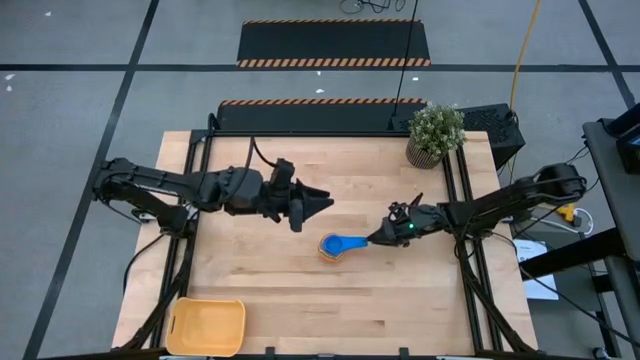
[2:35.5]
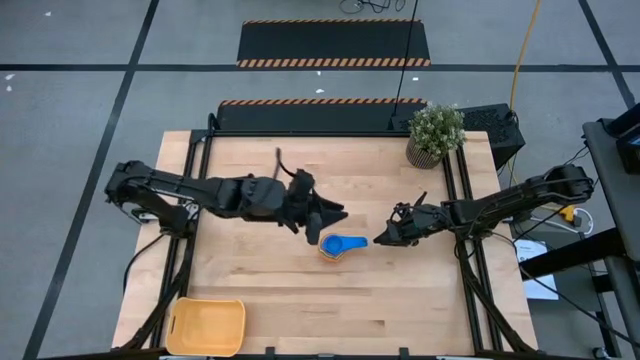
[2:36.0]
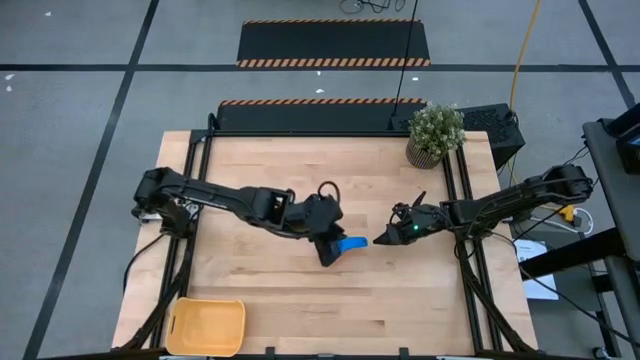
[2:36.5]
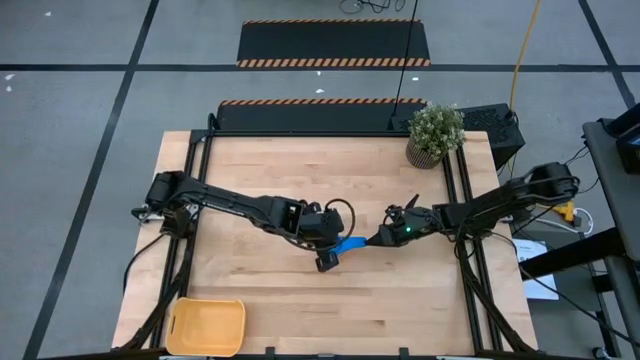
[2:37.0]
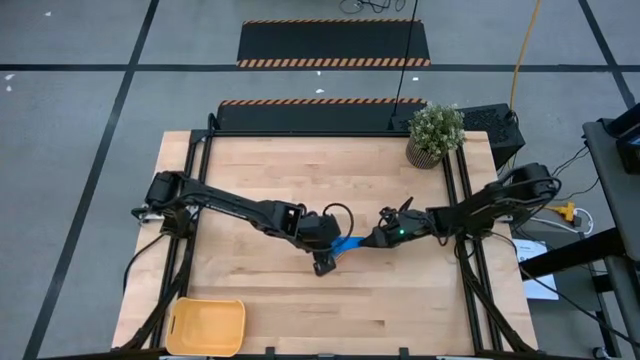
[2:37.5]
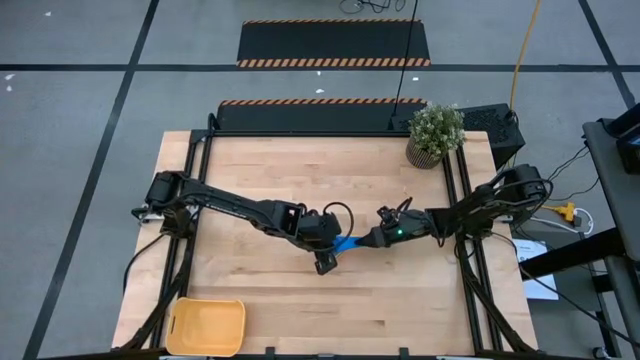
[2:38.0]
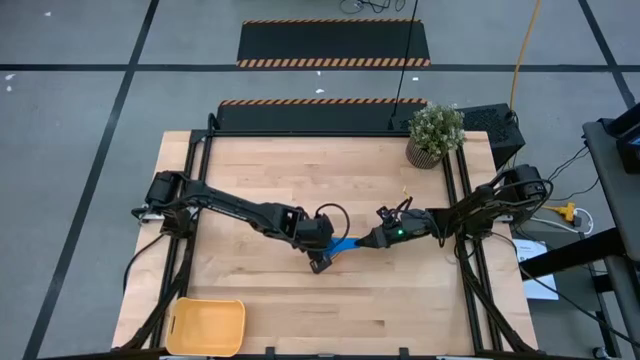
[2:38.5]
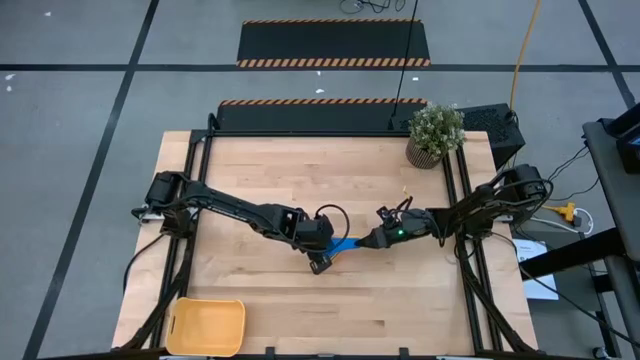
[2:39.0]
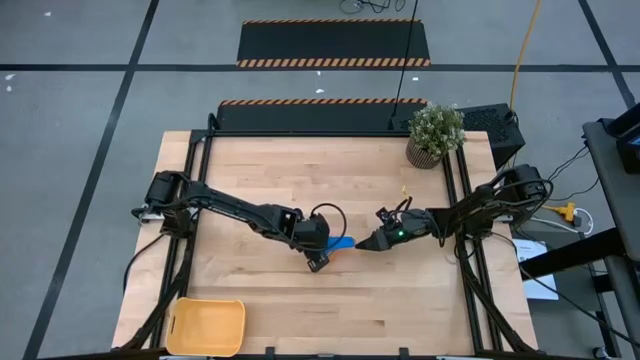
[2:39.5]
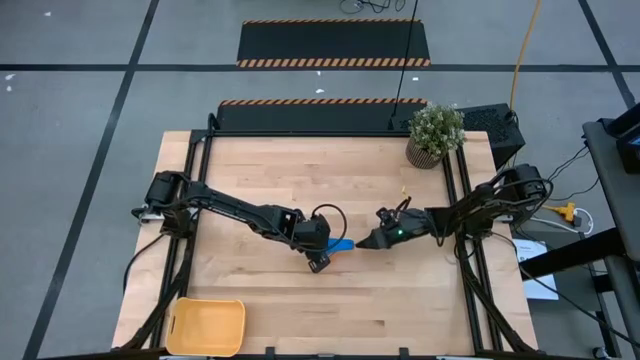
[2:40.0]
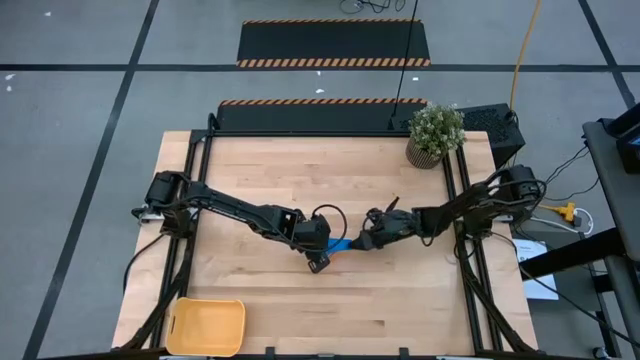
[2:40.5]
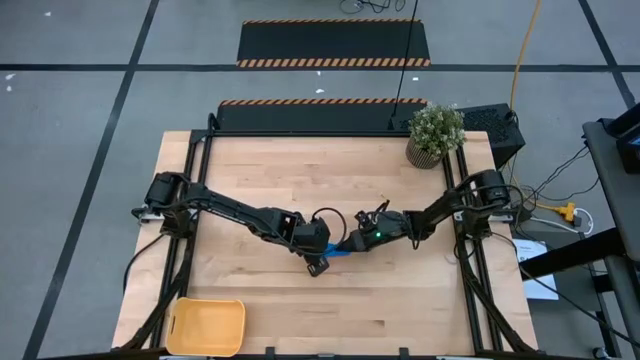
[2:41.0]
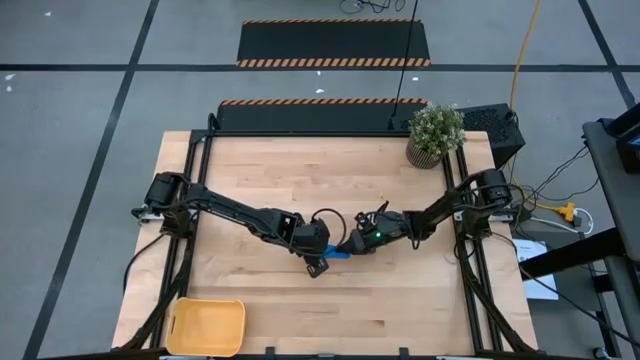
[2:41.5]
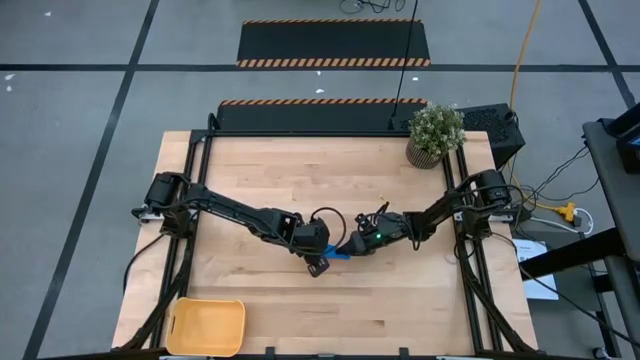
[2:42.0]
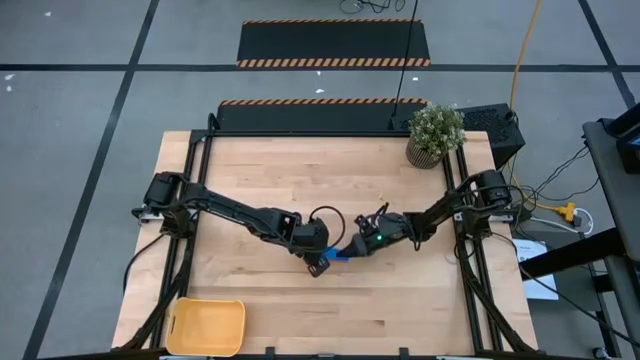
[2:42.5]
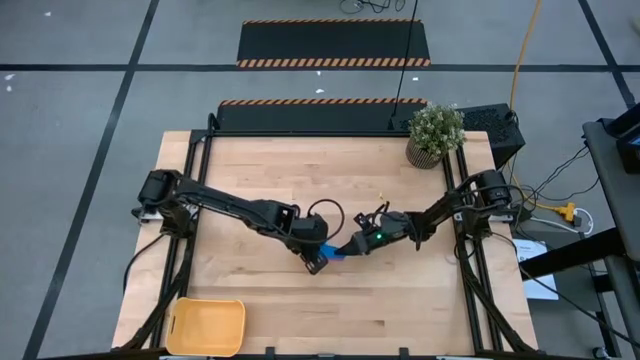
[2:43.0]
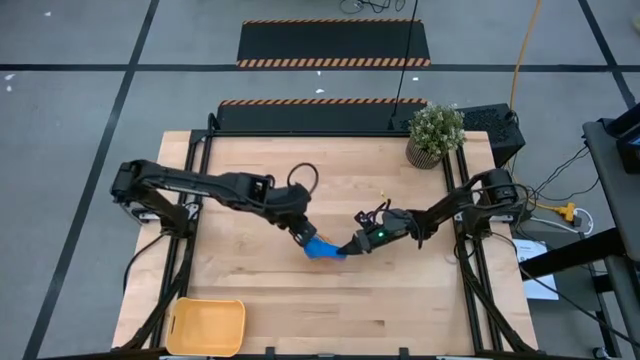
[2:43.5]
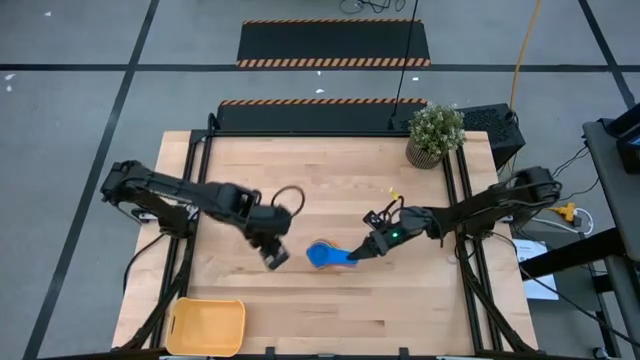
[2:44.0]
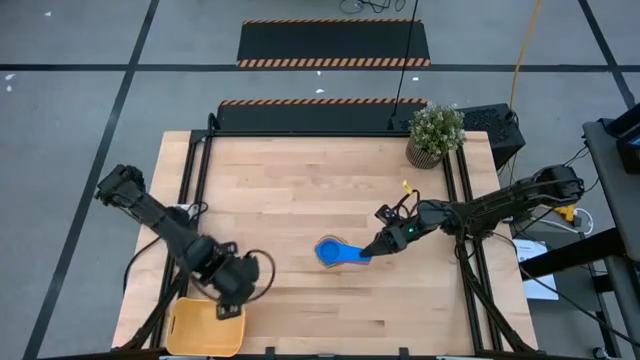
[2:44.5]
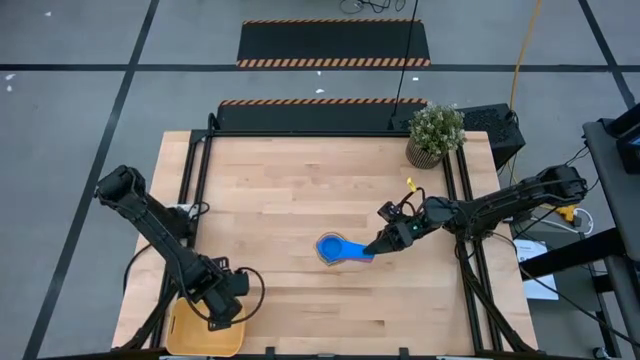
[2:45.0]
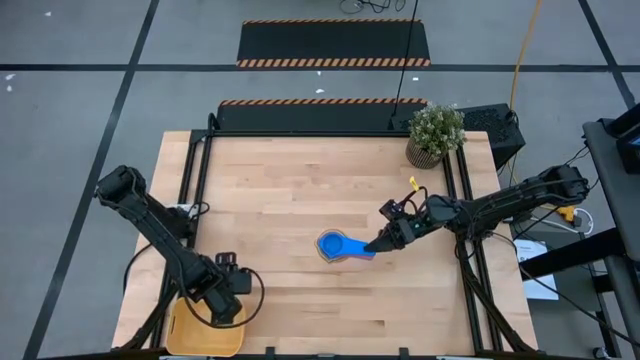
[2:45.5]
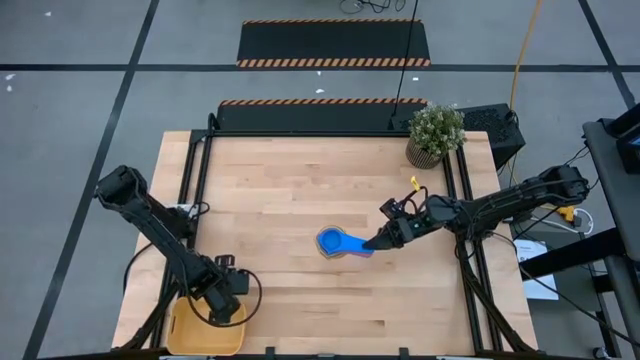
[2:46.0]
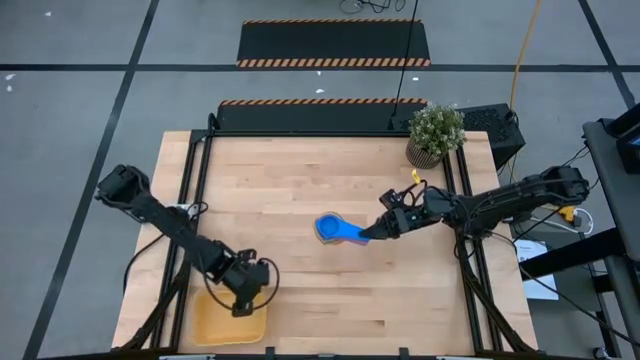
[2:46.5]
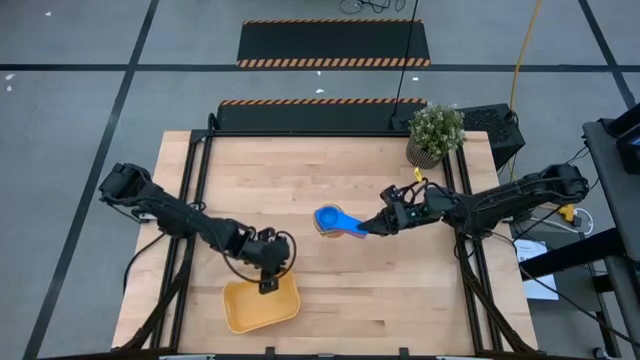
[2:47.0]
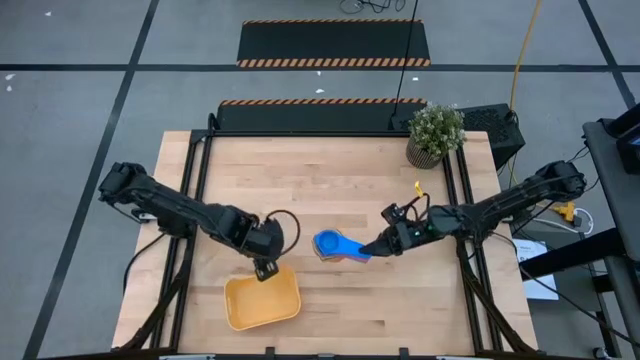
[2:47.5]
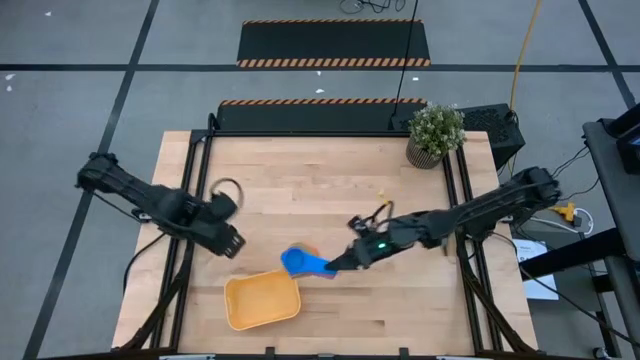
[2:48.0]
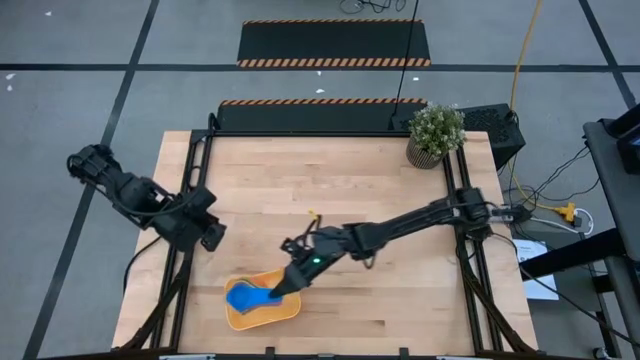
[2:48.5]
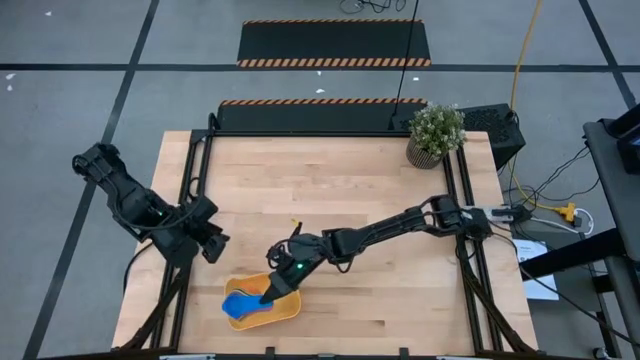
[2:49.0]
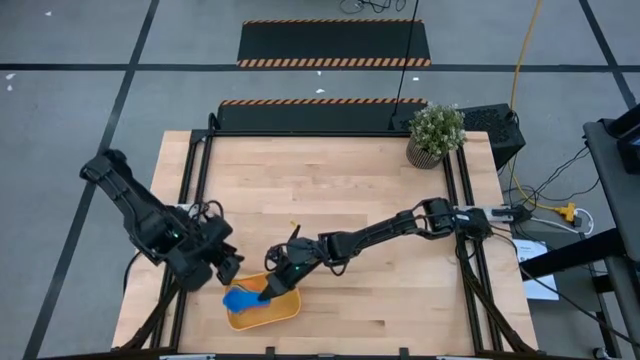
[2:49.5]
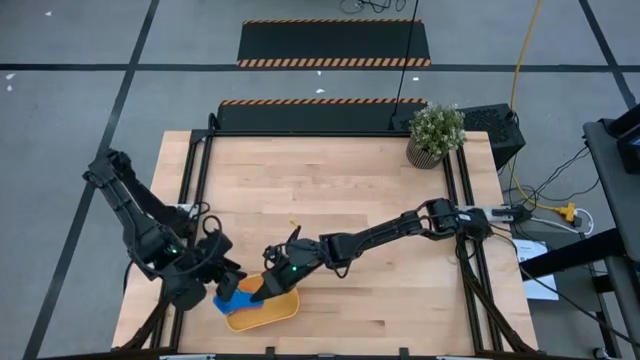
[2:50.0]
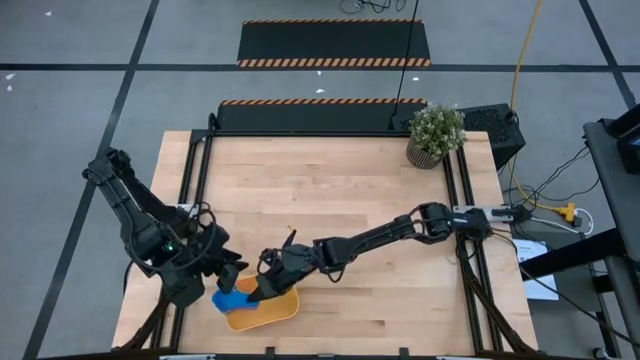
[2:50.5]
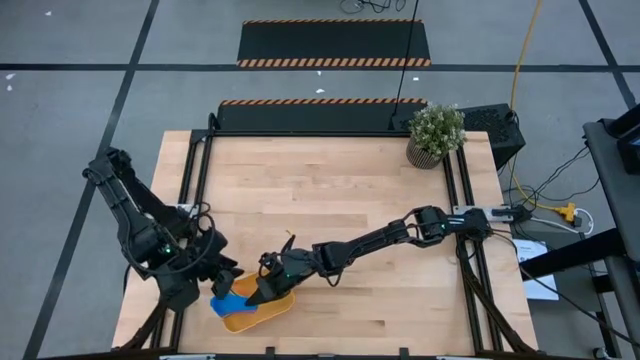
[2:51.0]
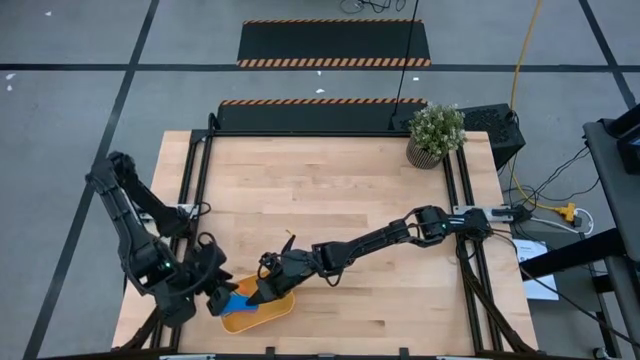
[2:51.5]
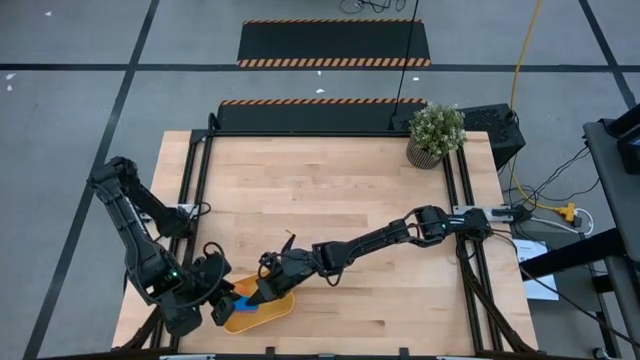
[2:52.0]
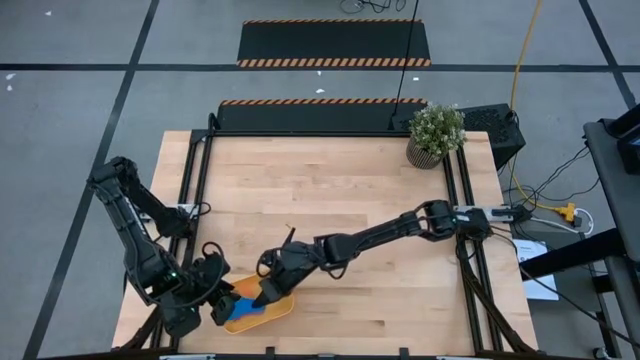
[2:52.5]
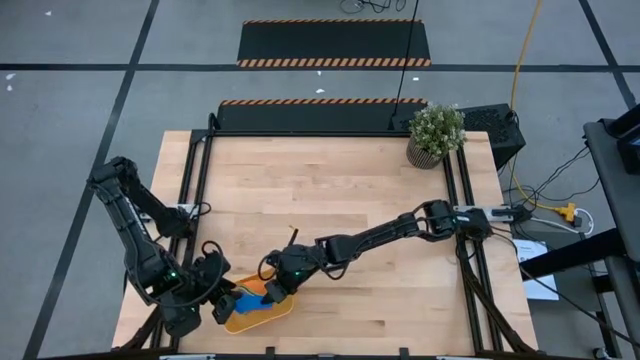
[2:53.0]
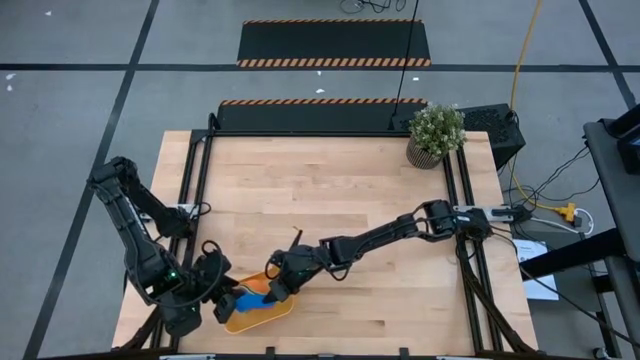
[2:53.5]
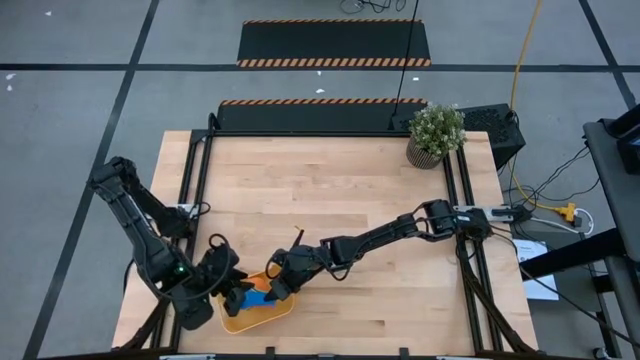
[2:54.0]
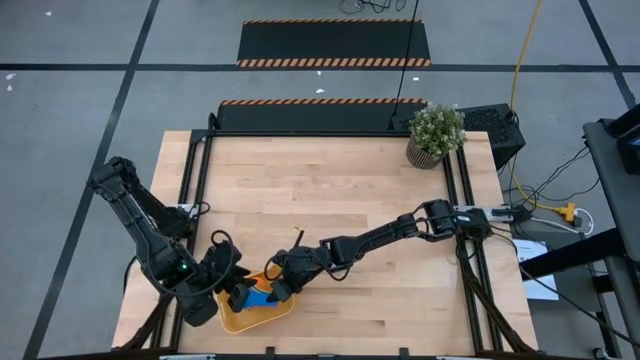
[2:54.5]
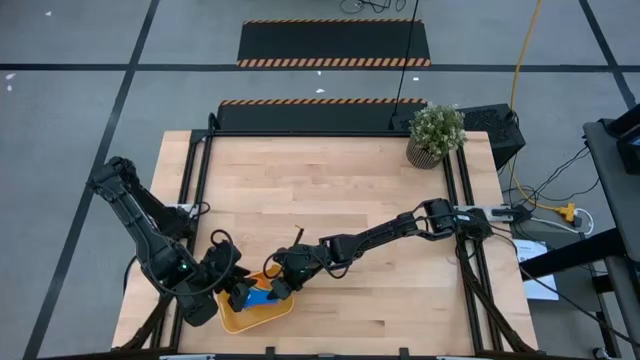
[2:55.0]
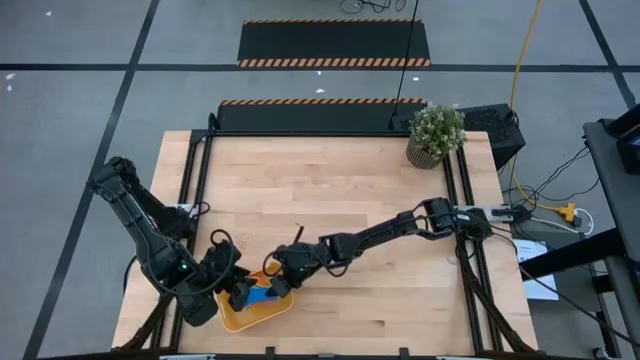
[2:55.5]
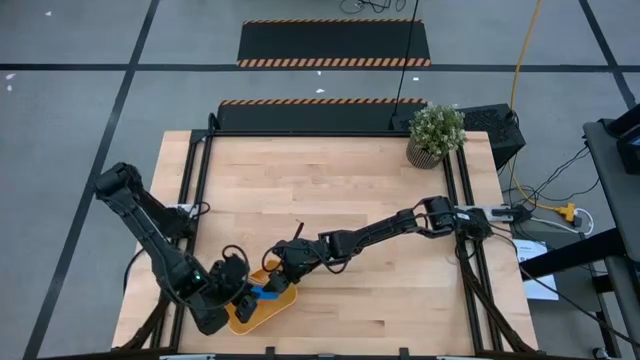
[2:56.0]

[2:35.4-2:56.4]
Task: Nest measuring cups in basket
Put the stacked measuring cups into the yellow bin
